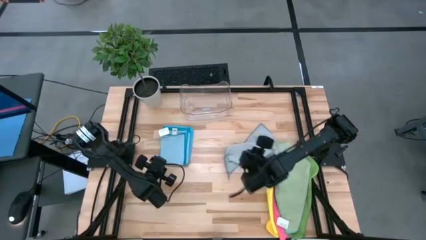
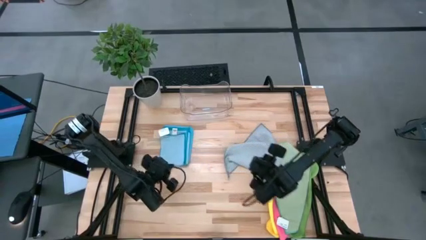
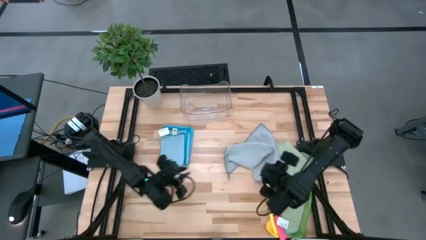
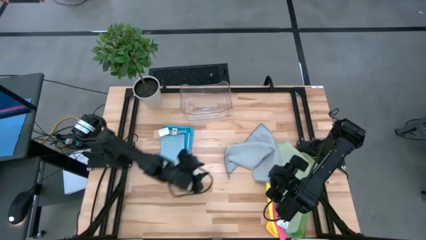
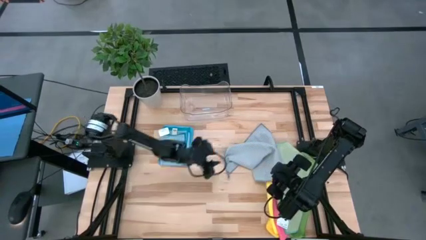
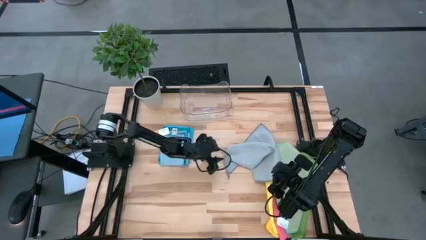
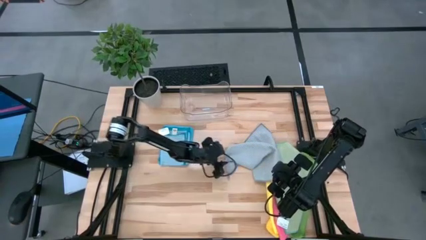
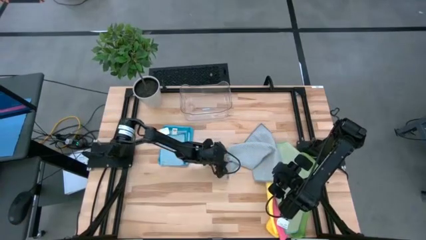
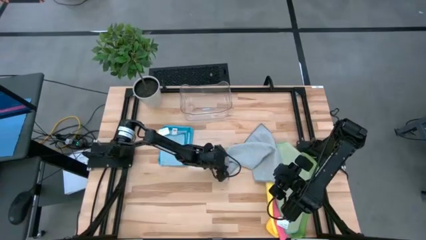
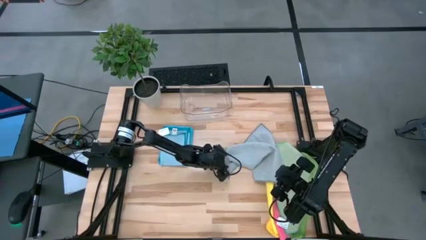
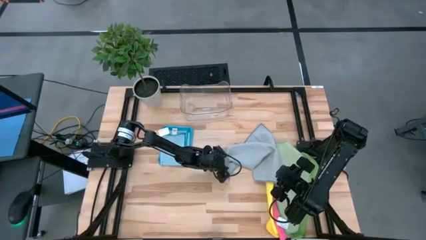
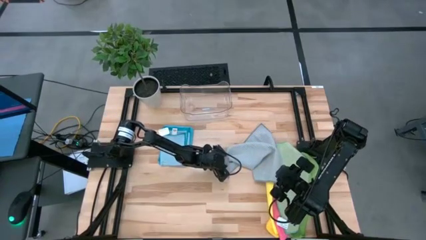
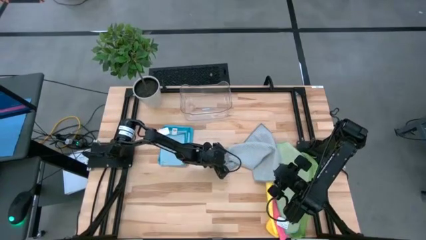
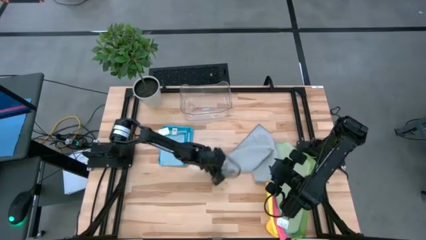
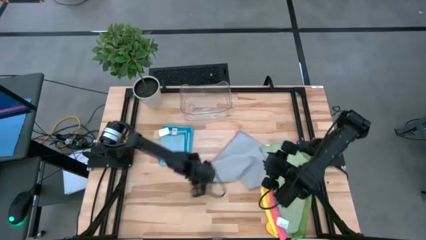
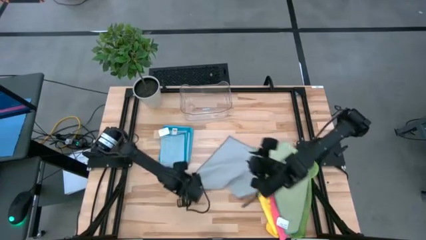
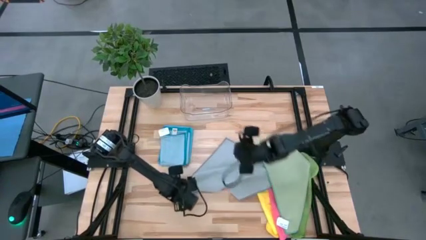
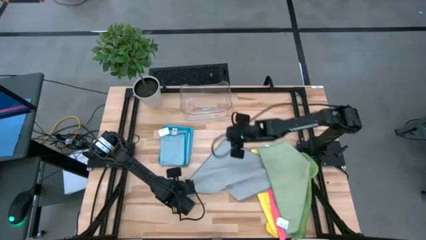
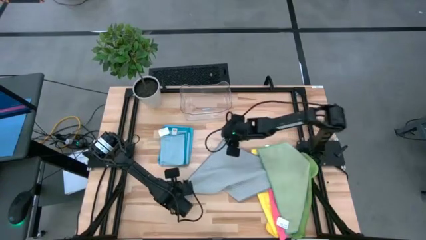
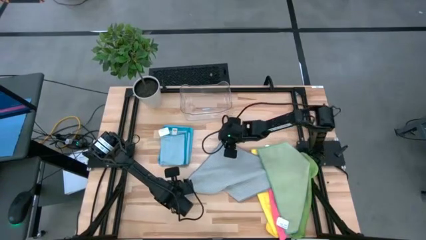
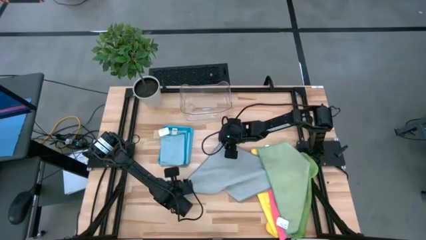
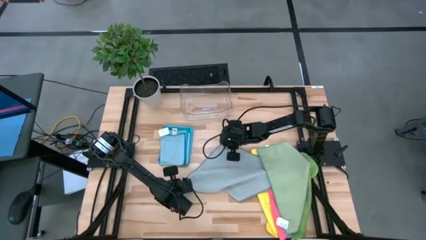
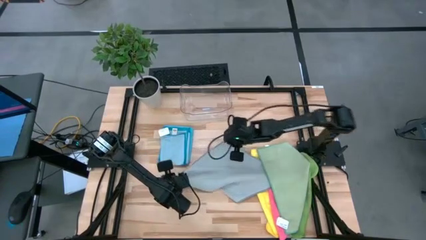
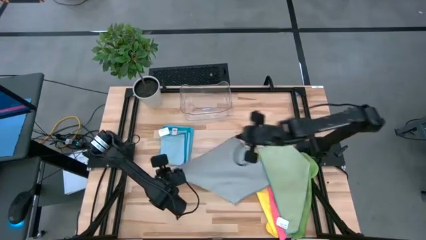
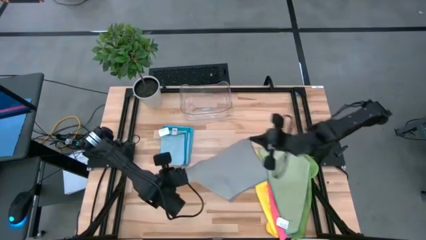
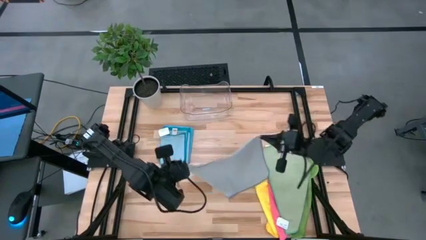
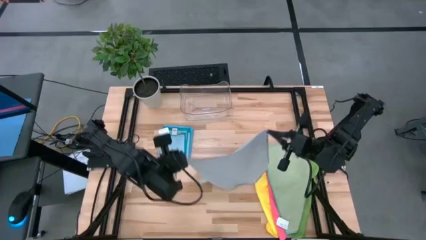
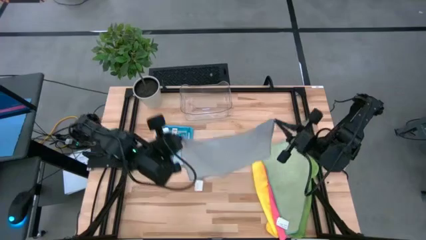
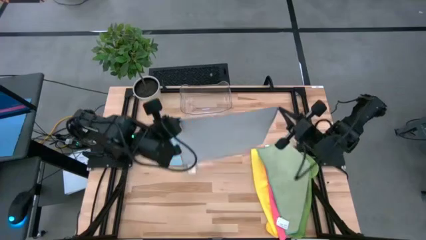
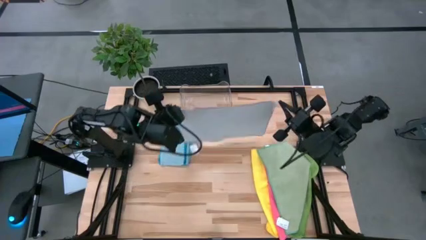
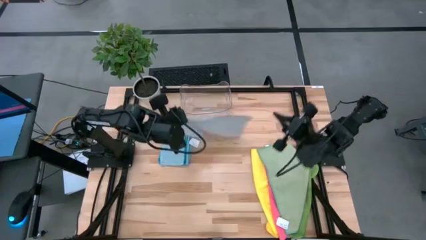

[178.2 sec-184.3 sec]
Task: Fold microfiber towels
Fold the gray microfiber cloth

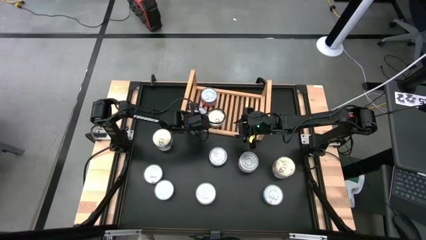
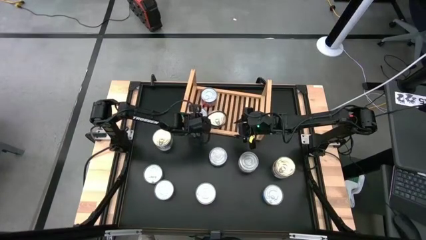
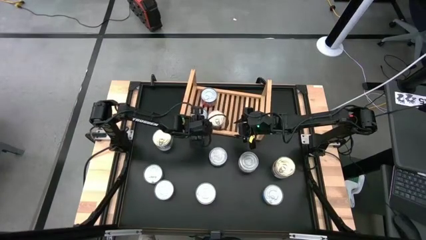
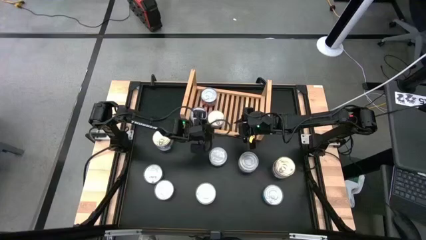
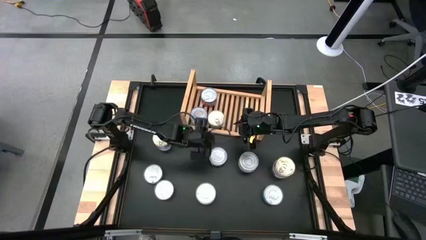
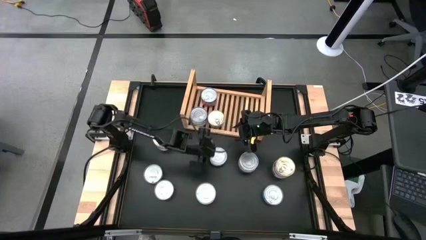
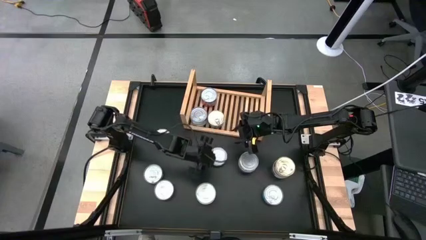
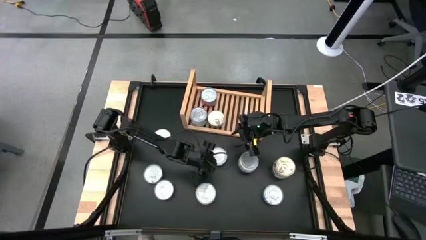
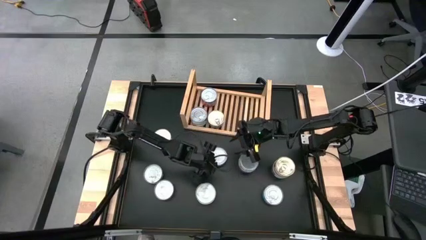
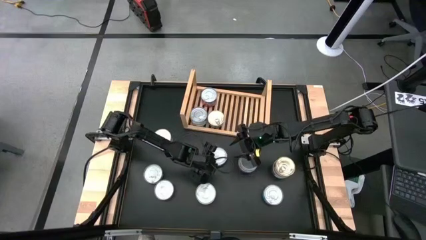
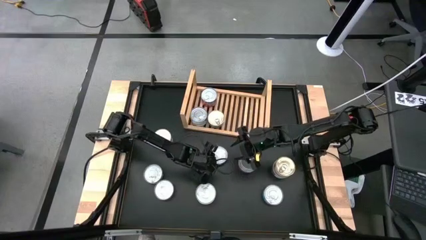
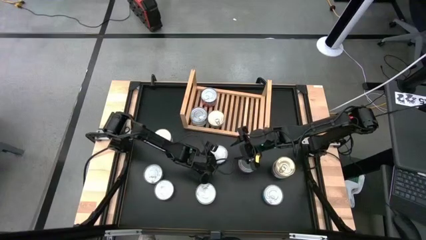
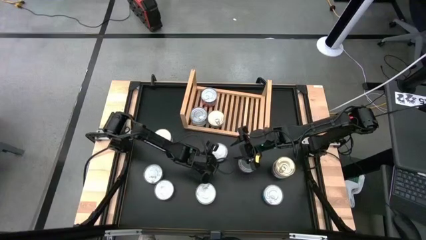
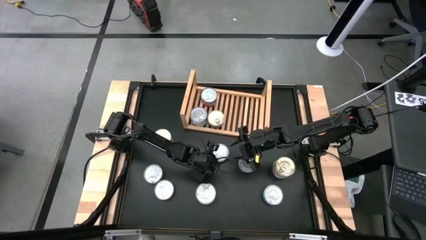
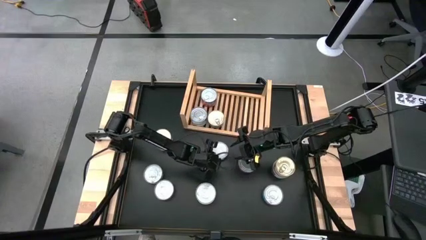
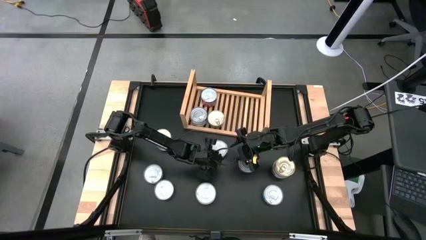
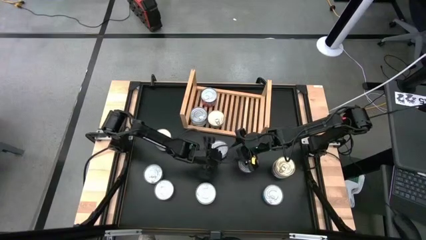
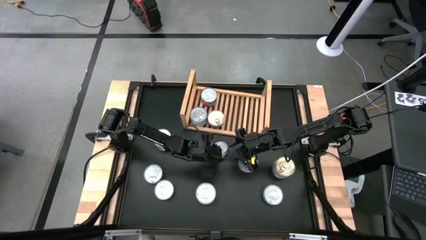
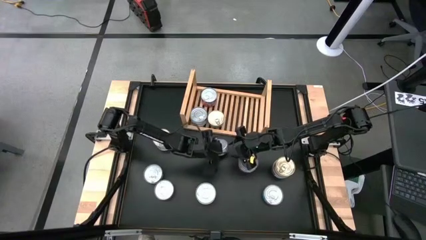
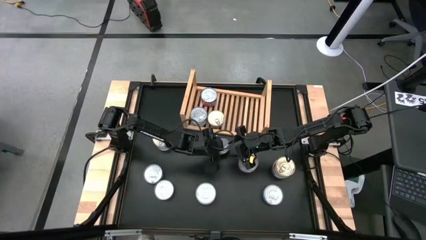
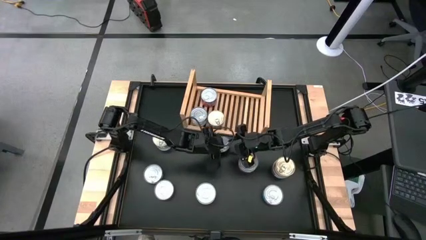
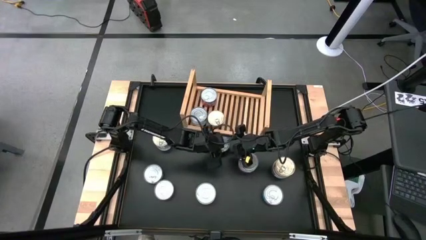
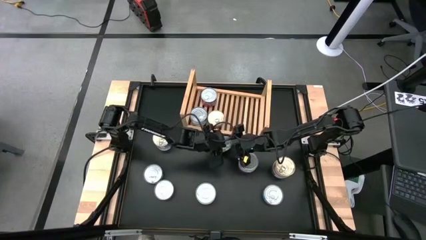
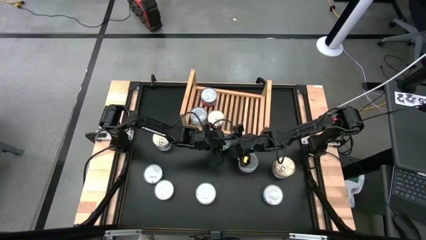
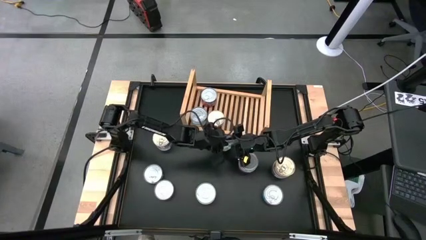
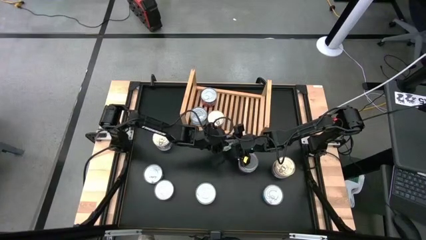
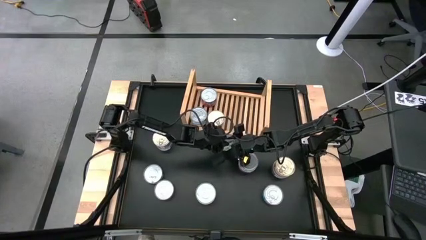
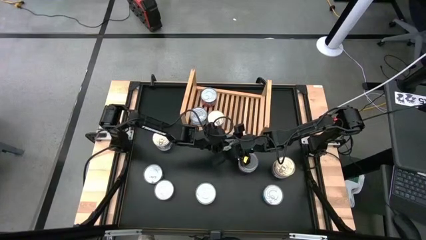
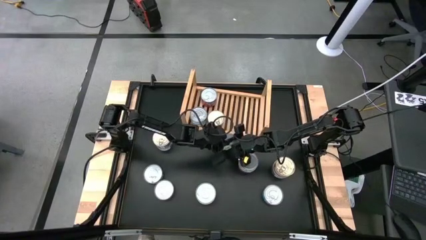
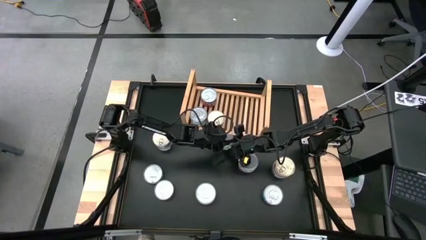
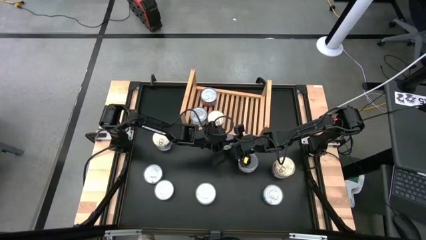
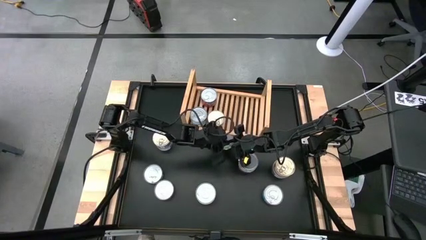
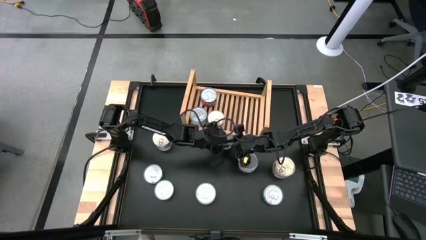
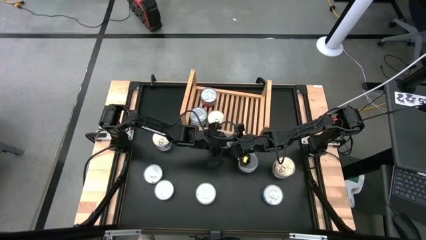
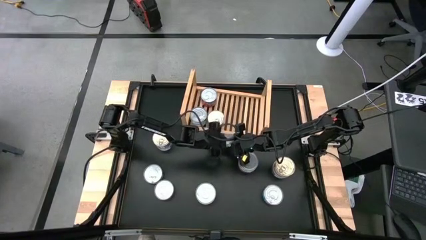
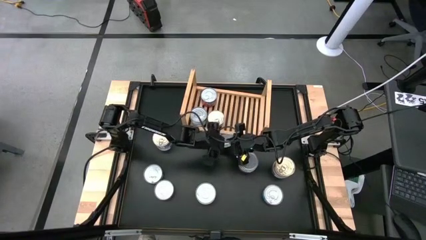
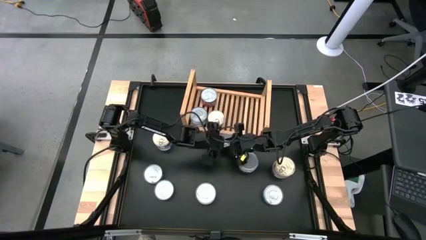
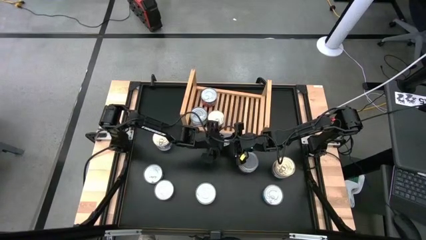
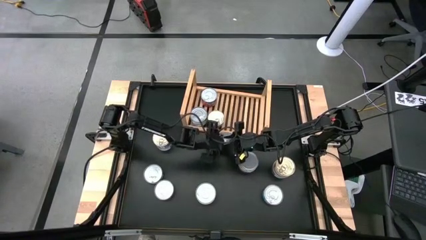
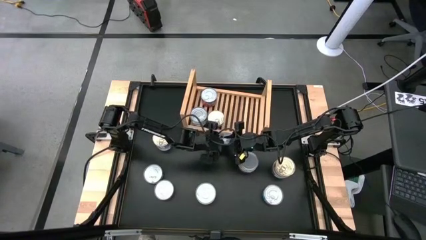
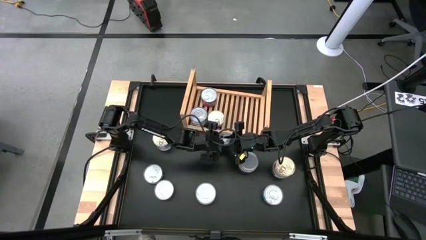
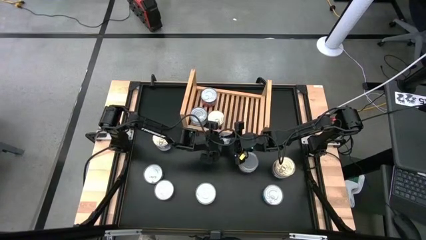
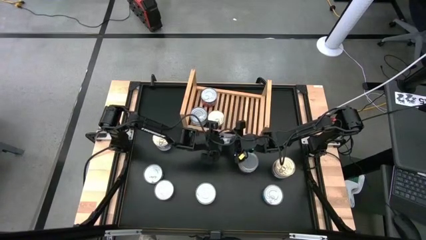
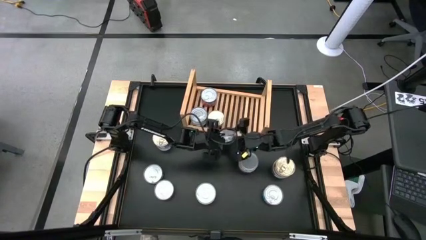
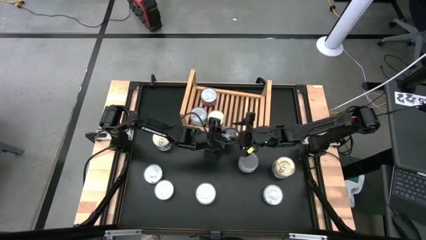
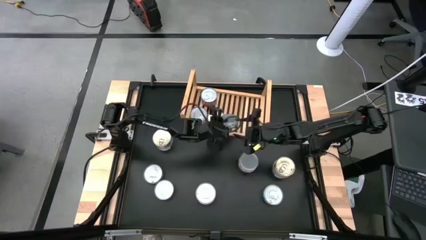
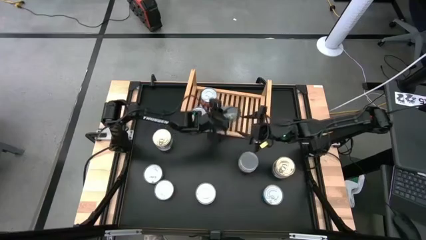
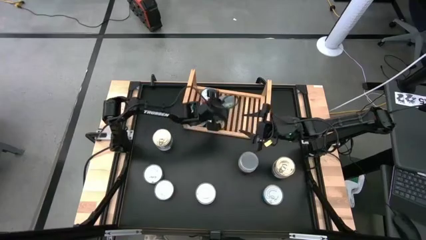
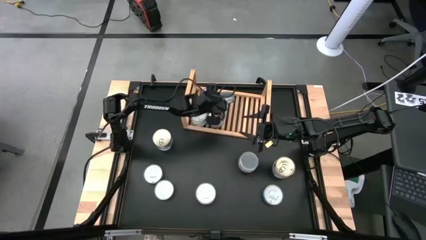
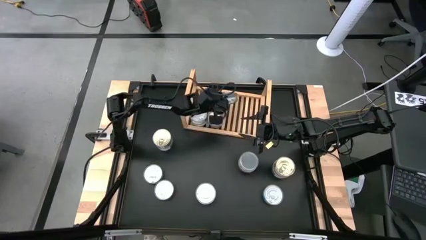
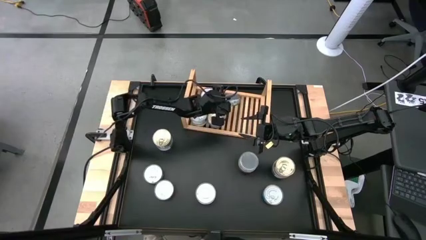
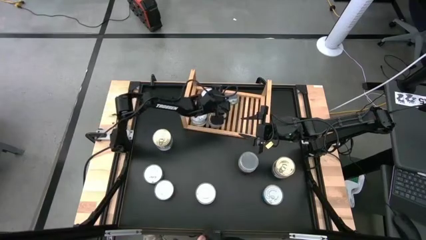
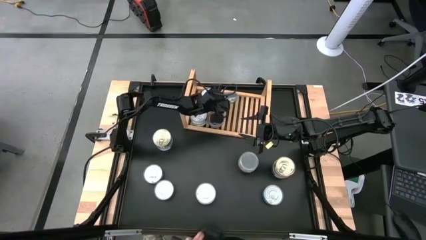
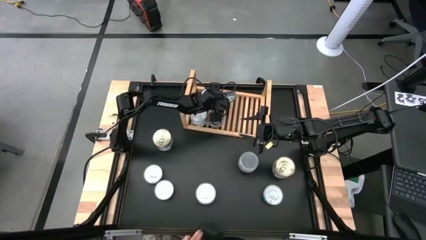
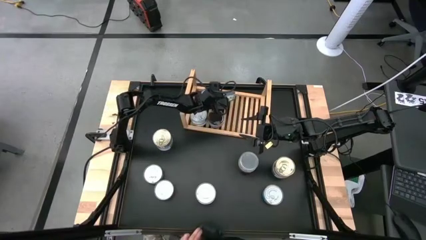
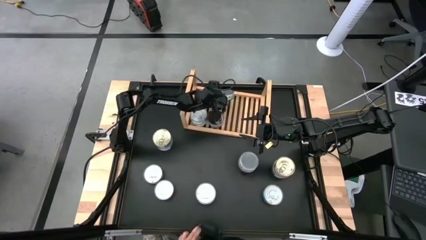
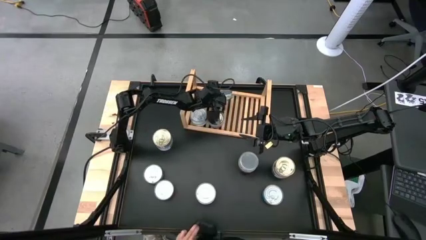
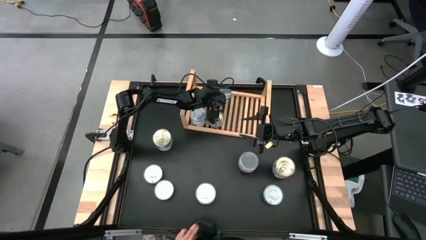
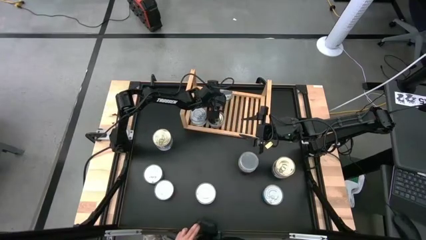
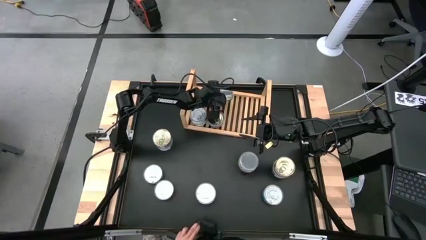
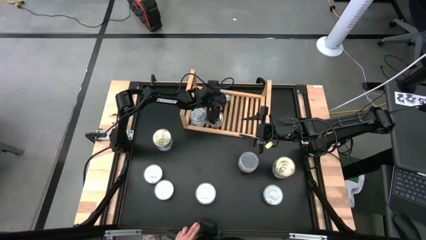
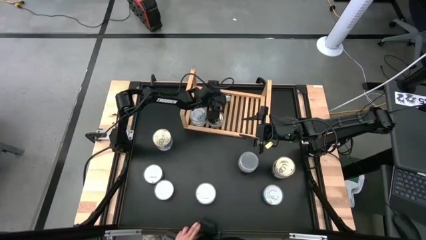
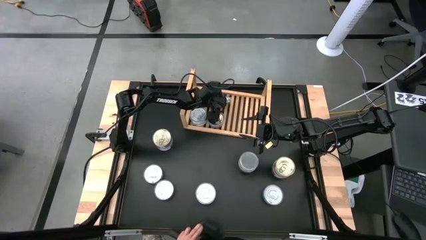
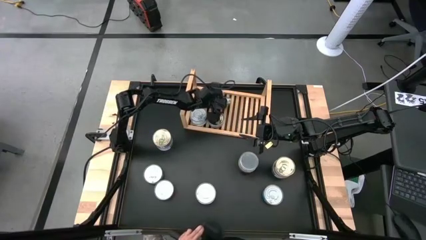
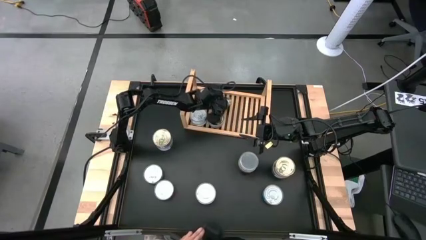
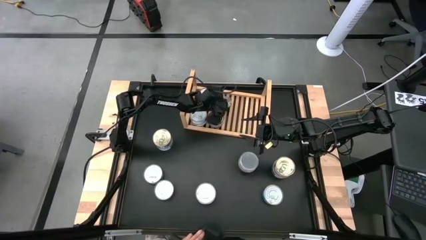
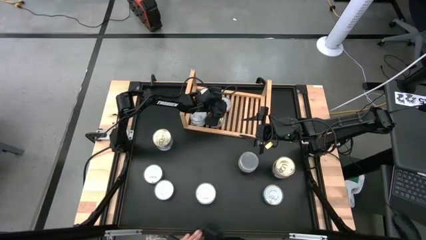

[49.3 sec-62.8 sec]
Task: Stack canned seafood by type on shelf
Put the green tuna can on the shelf
